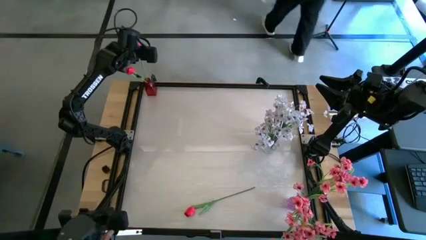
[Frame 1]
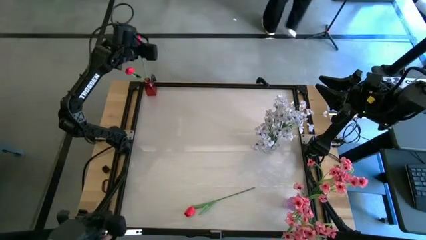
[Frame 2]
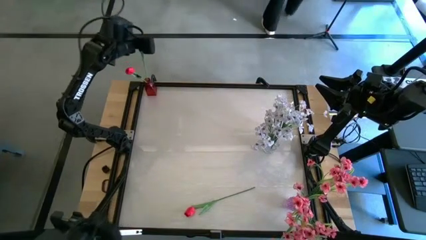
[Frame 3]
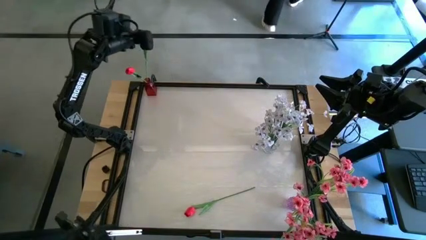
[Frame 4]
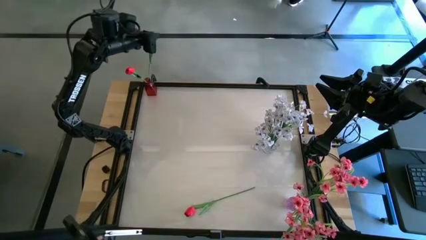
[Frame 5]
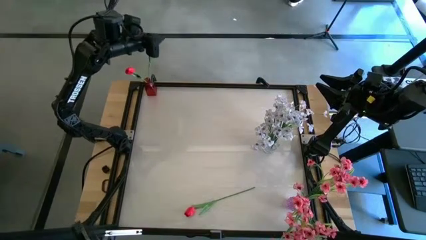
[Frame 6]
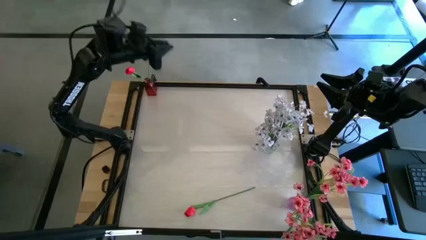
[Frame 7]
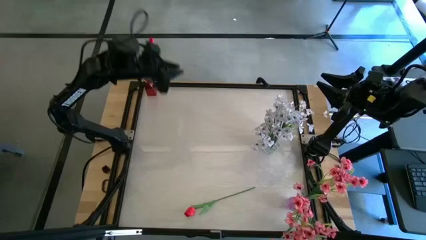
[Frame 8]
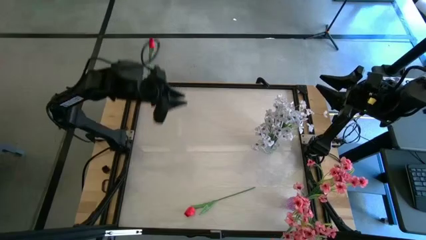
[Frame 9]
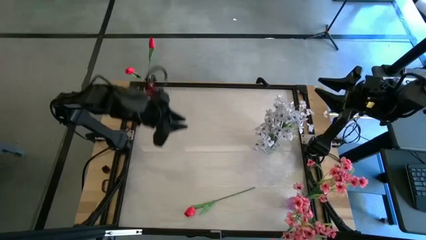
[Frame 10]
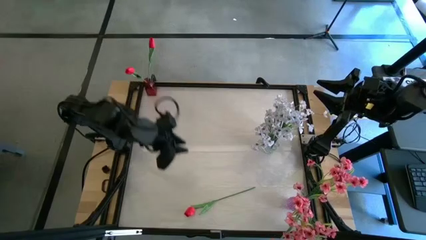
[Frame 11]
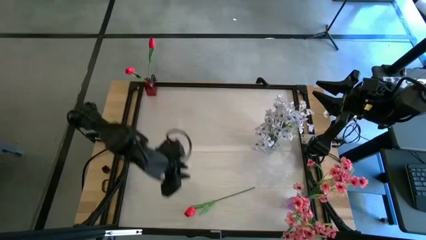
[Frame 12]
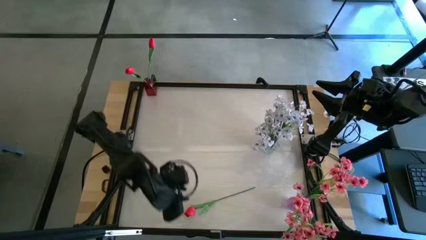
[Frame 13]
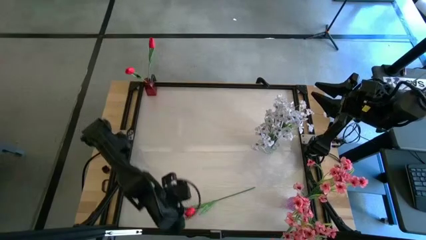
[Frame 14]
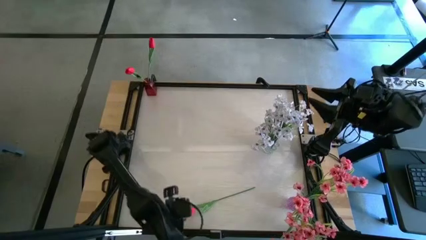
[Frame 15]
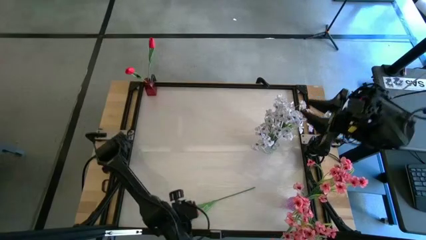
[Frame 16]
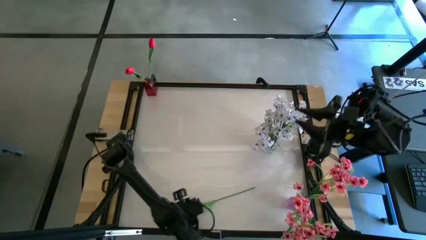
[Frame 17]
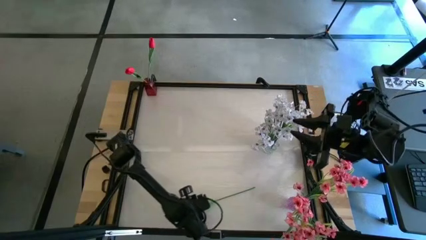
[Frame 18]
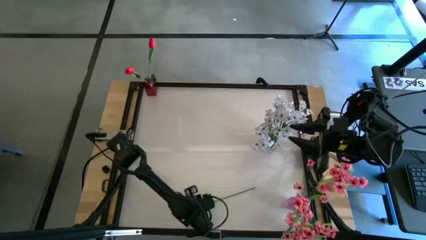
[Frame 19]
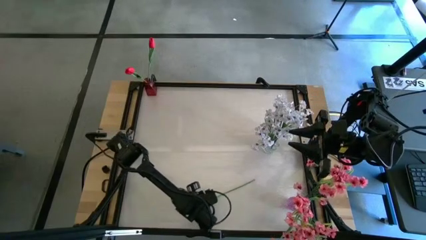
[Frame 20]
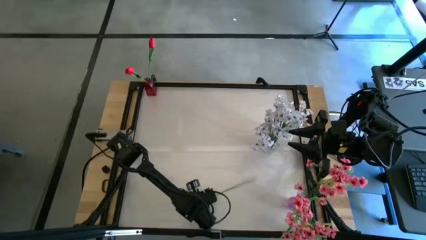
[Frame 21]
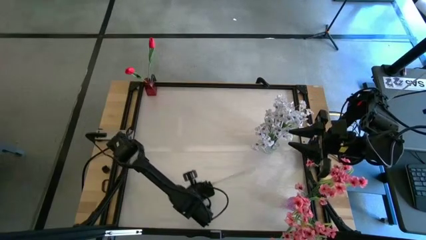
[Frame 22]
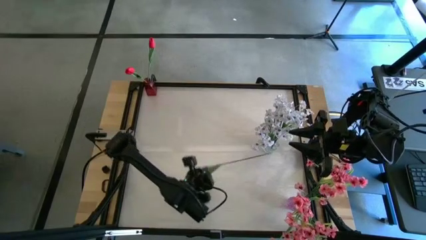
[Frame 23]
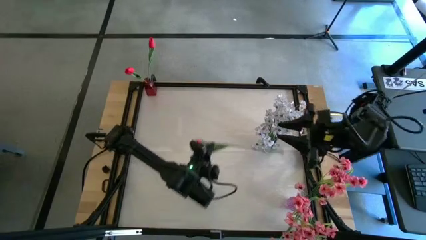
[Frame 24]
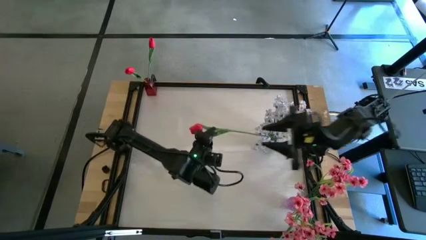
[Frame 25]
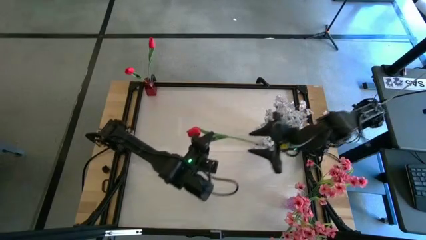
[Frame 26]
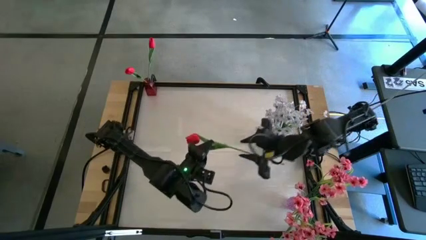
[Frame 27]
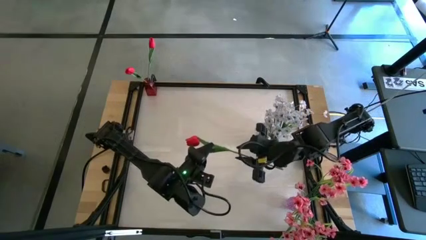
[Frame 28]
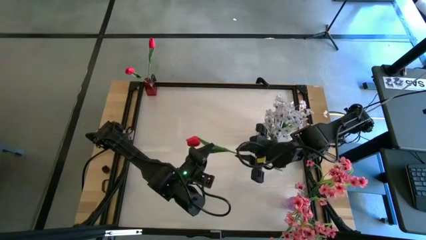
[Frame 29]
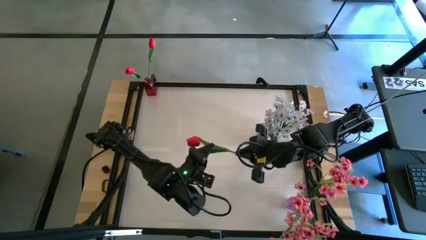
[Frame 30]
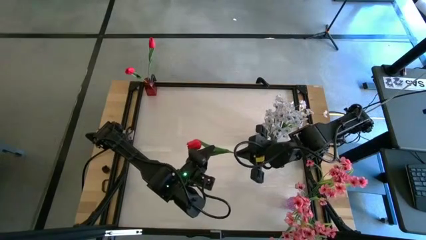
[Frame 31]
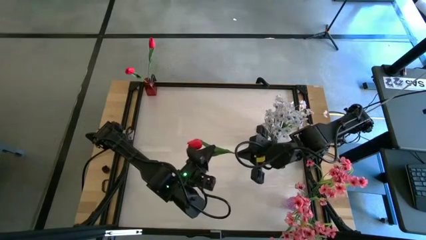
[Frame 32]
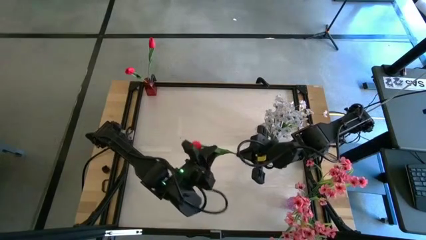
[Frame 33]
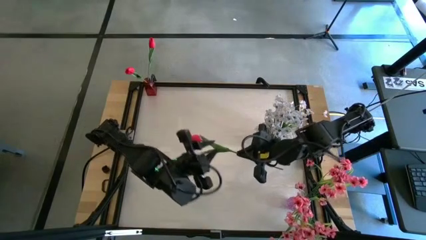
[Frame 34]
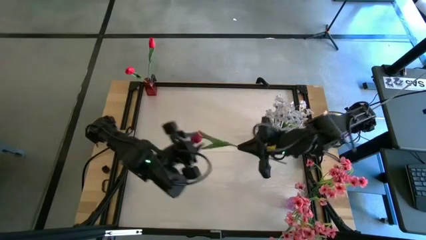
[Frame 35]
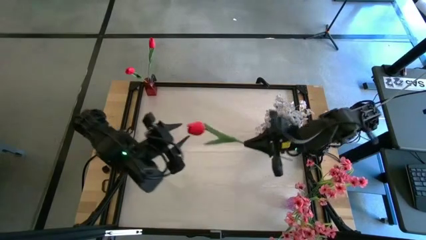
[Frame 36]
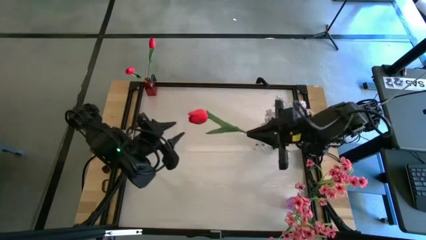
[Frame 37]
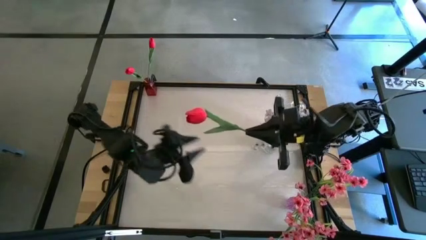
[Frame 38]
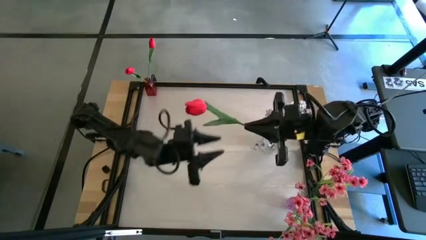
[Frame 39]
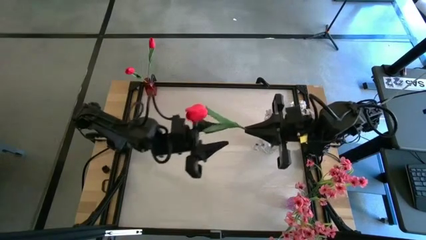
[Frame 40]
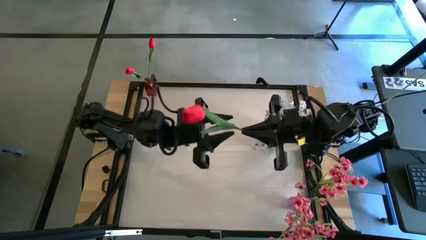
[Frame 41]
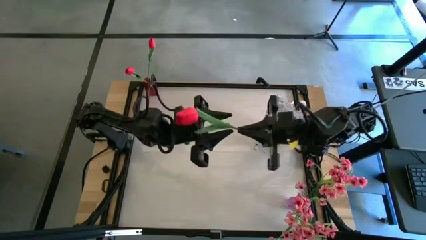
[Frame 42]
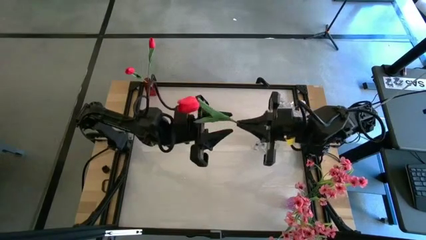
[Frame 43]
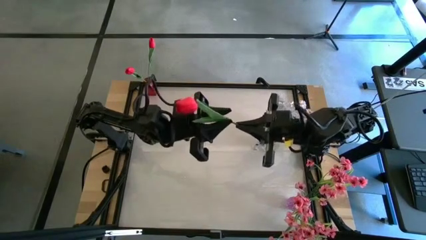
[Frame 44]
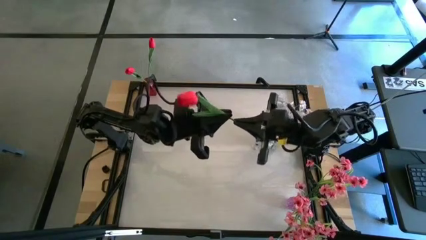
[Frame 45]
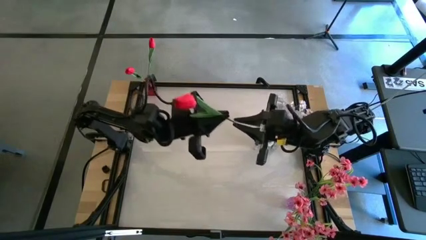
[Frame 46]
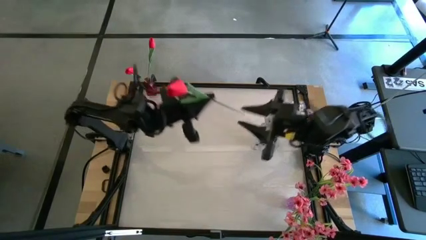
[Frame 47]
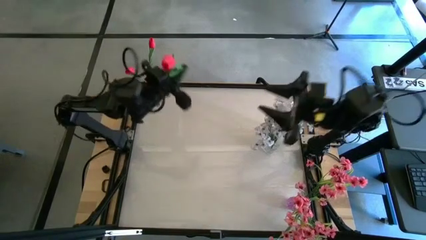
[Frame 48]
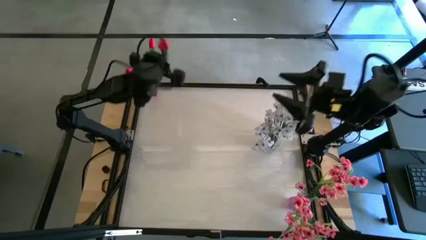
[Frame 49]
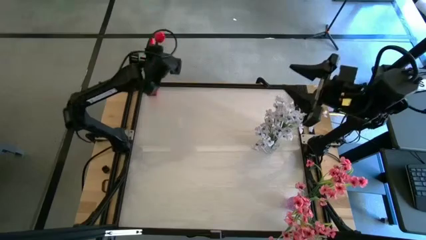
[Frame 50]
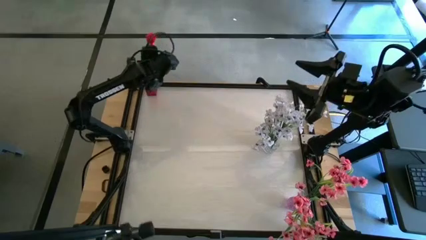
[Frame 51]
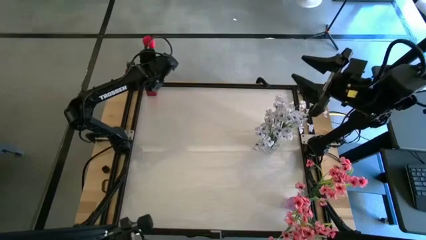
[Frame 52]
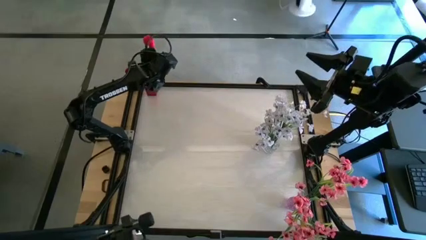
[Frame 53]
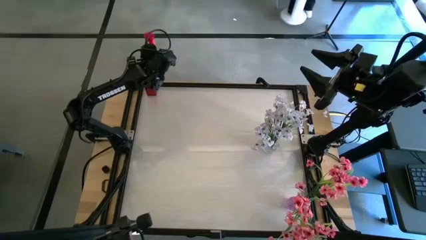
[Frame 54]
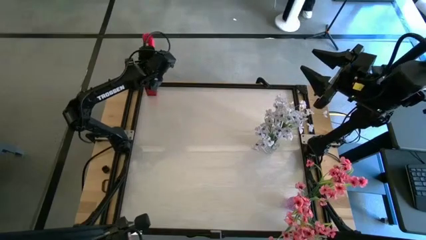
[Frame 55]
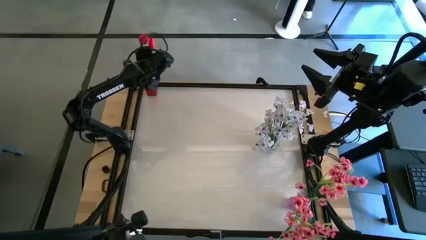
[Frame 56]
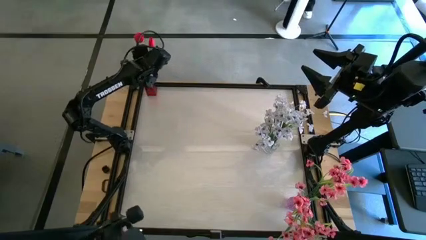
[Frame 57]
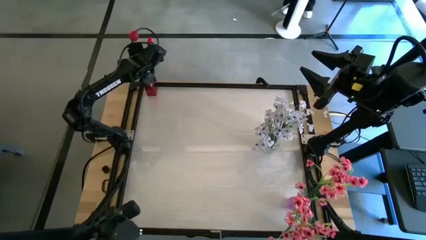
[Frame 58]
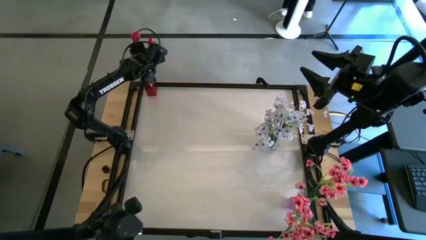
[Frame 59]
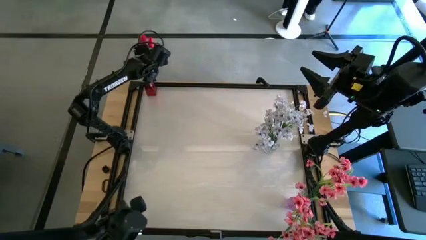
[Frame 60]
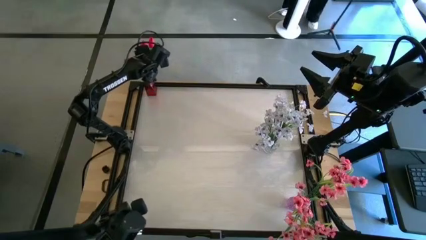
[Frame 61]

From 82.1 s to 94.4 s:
Task: Sort flowers into vase by color
Put the red tulip into the red vase
